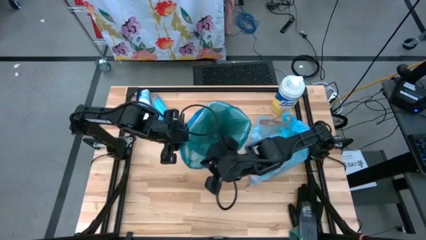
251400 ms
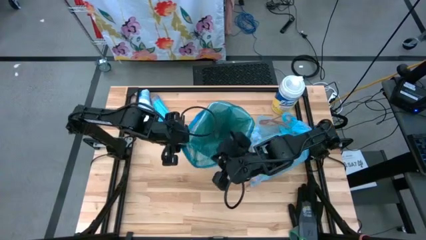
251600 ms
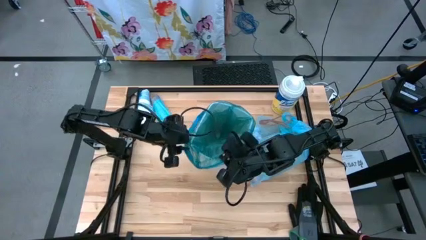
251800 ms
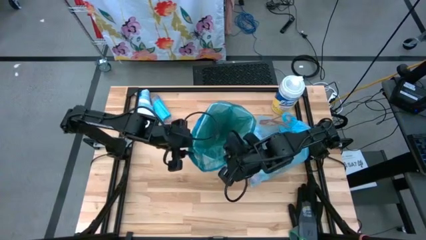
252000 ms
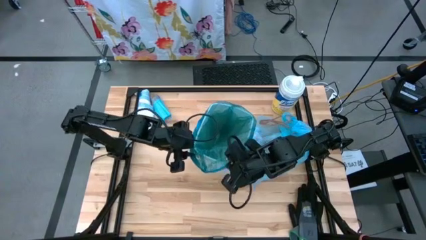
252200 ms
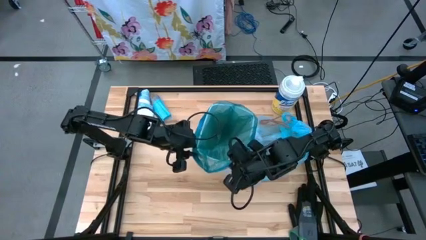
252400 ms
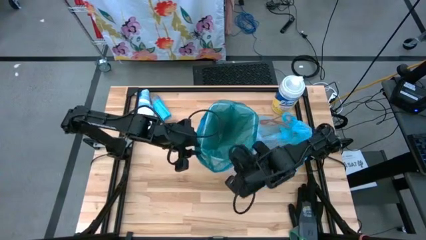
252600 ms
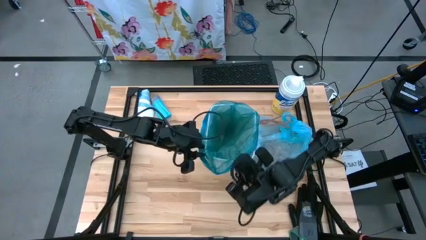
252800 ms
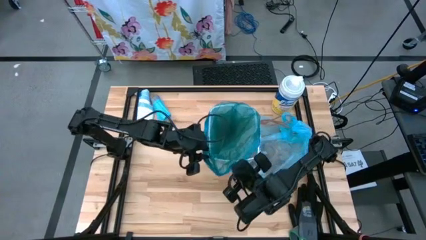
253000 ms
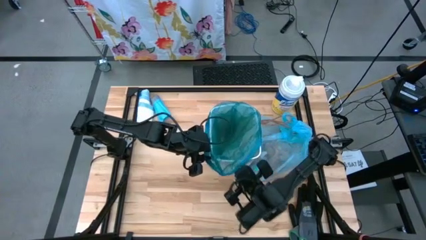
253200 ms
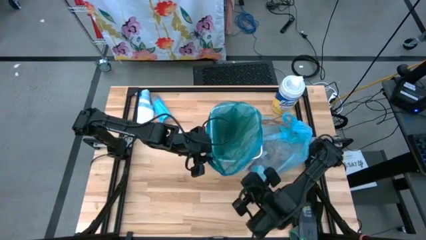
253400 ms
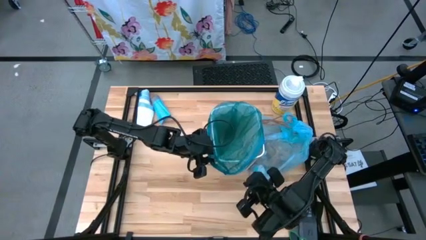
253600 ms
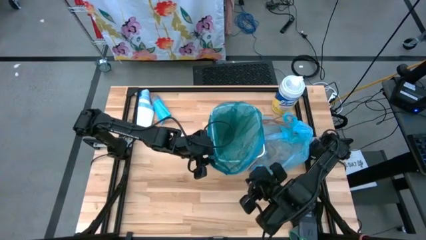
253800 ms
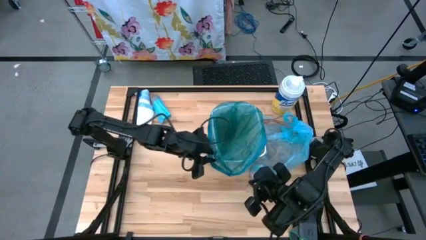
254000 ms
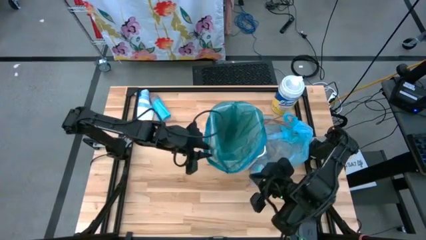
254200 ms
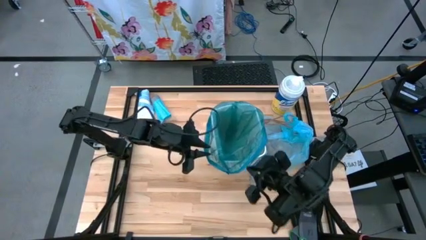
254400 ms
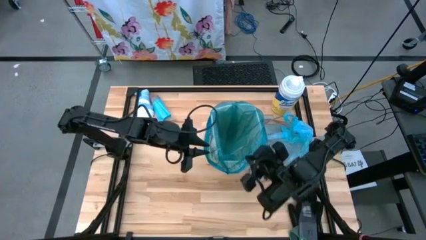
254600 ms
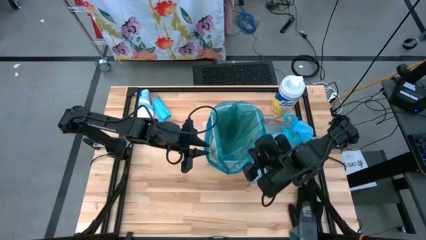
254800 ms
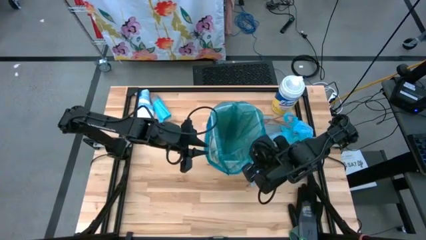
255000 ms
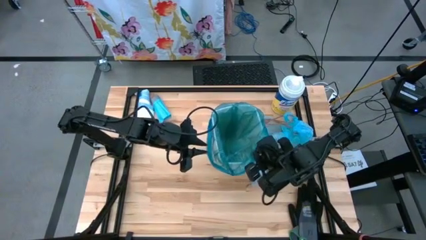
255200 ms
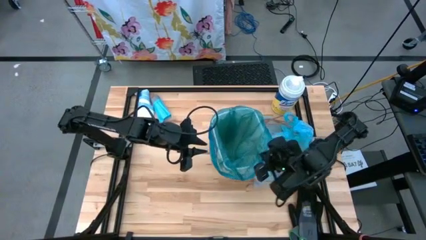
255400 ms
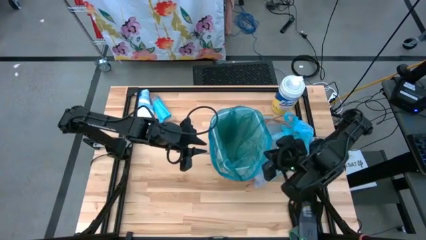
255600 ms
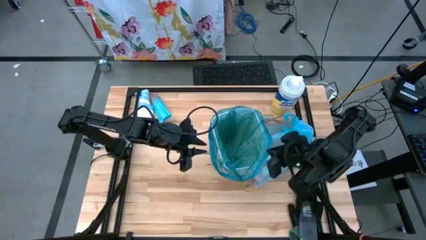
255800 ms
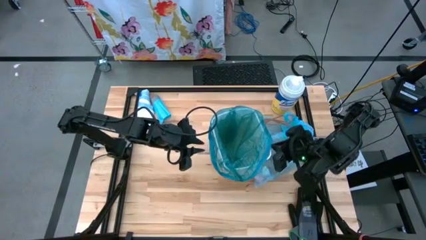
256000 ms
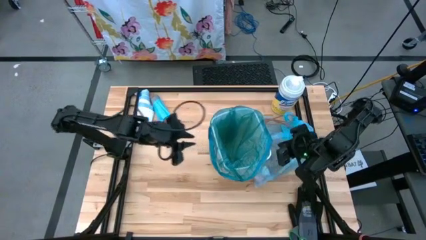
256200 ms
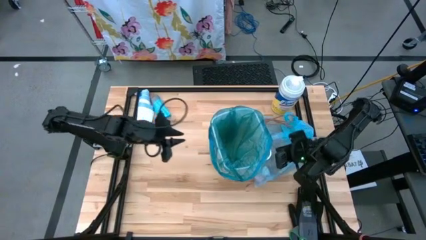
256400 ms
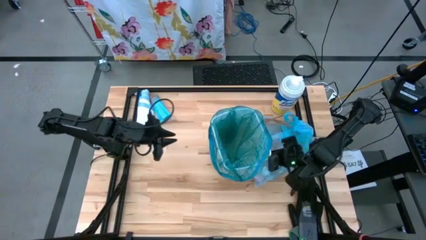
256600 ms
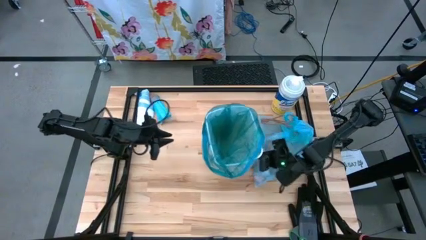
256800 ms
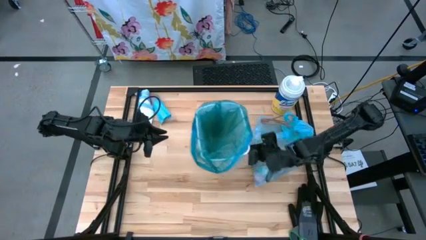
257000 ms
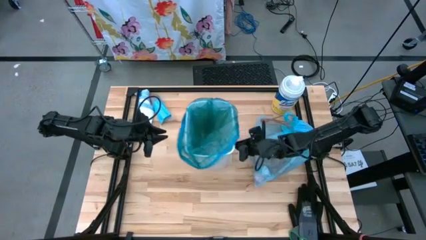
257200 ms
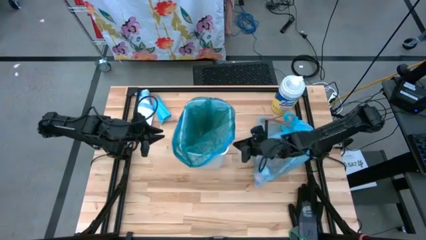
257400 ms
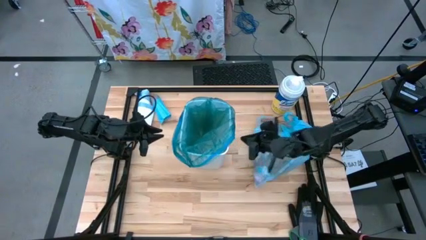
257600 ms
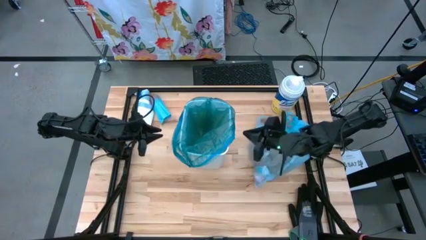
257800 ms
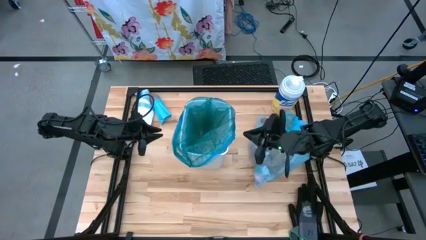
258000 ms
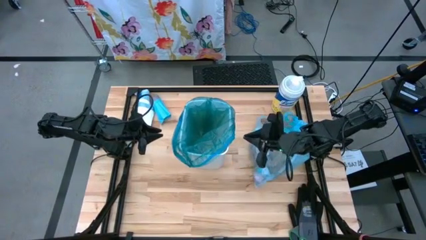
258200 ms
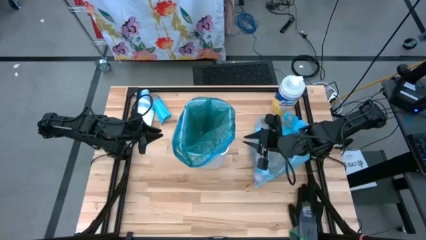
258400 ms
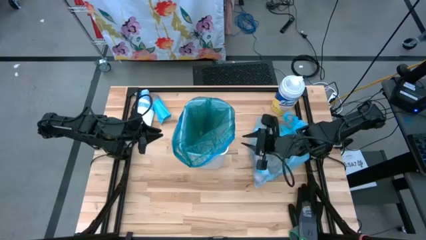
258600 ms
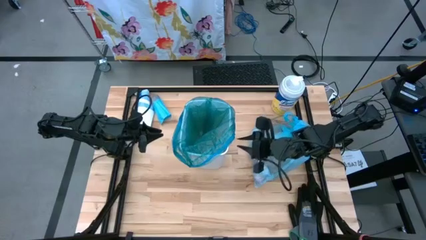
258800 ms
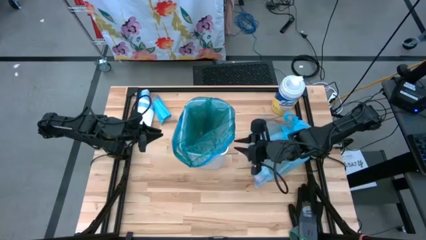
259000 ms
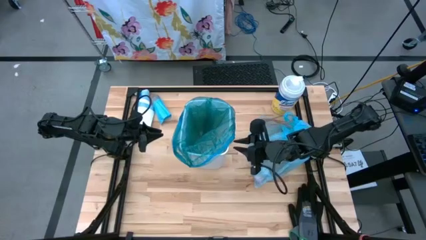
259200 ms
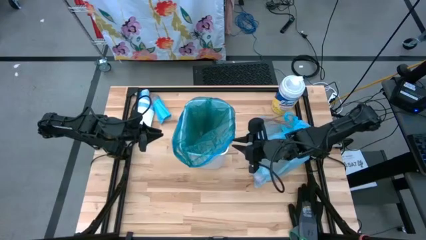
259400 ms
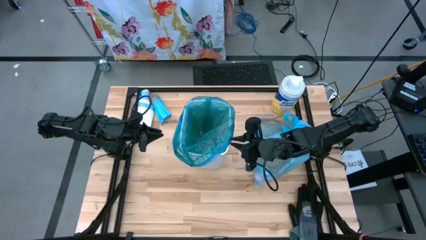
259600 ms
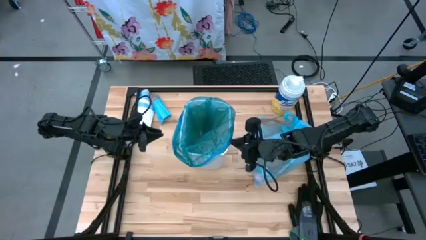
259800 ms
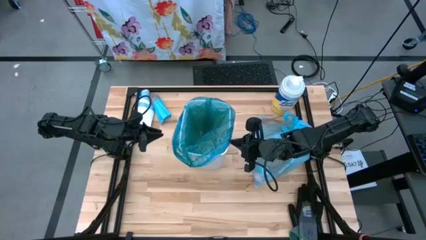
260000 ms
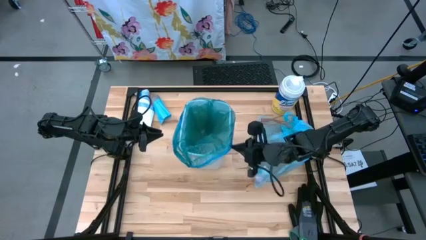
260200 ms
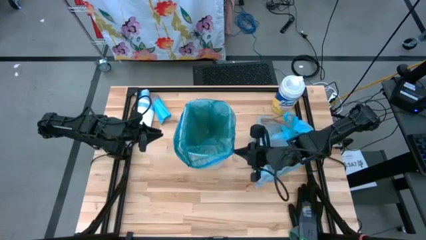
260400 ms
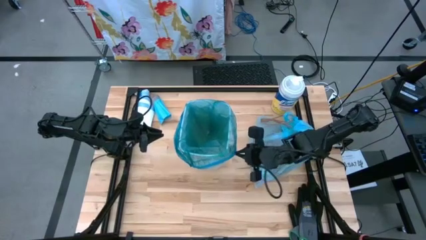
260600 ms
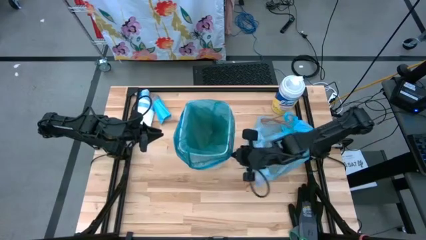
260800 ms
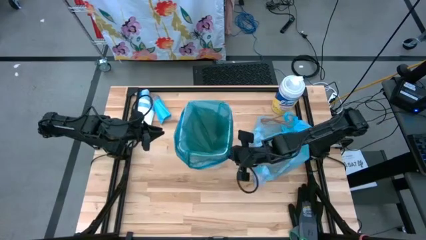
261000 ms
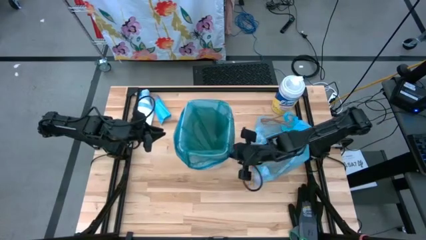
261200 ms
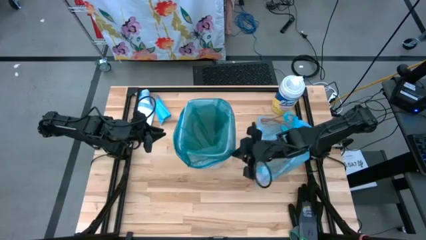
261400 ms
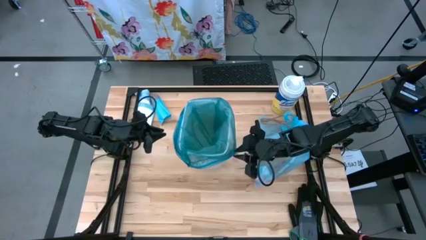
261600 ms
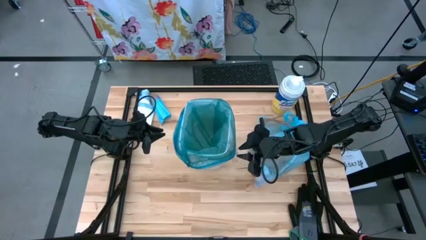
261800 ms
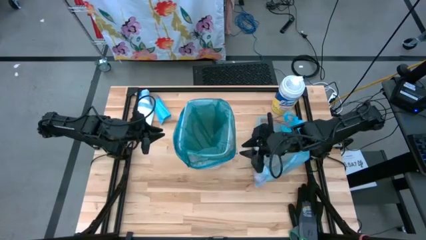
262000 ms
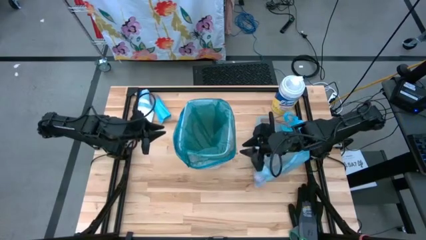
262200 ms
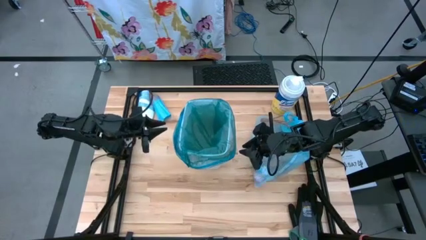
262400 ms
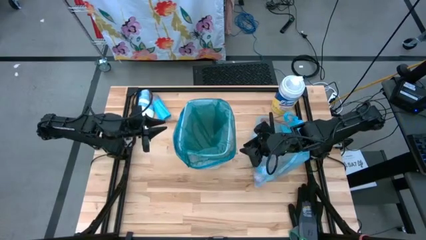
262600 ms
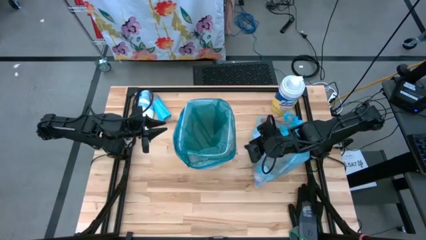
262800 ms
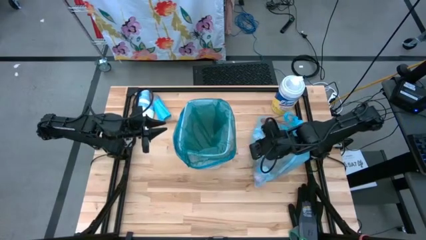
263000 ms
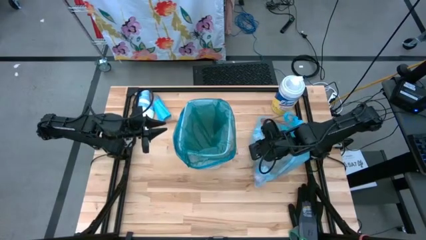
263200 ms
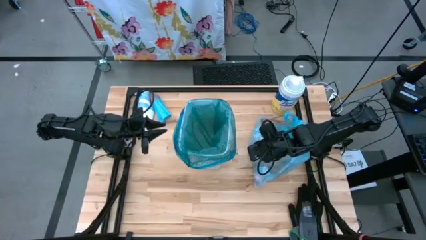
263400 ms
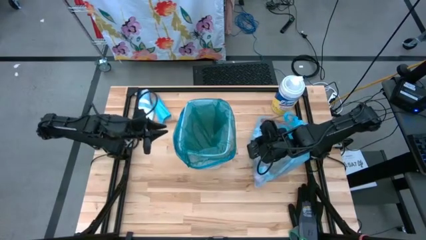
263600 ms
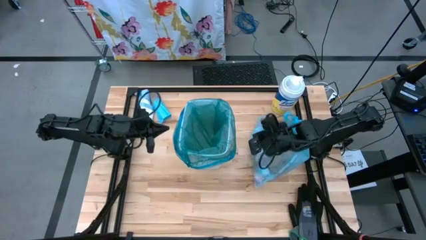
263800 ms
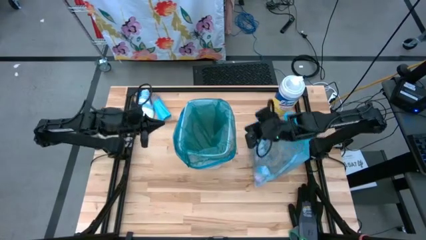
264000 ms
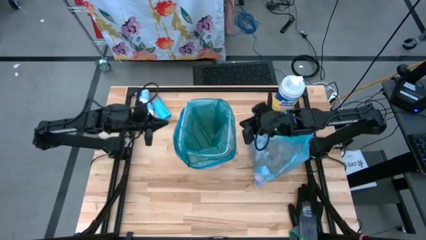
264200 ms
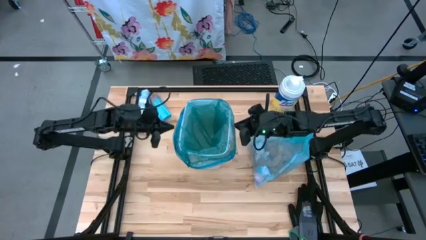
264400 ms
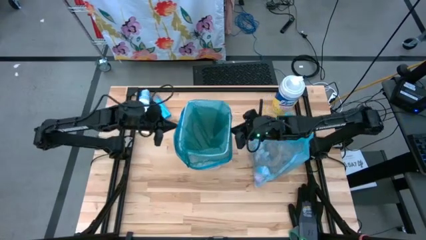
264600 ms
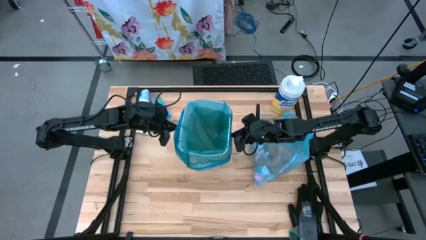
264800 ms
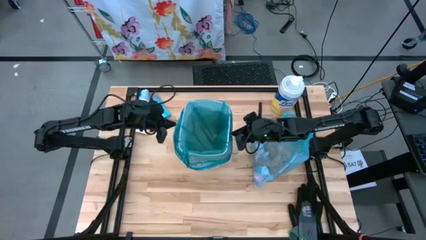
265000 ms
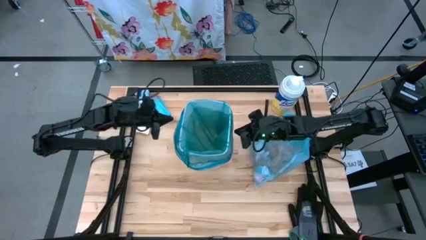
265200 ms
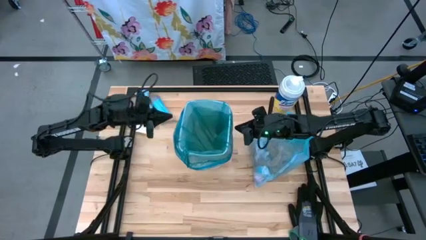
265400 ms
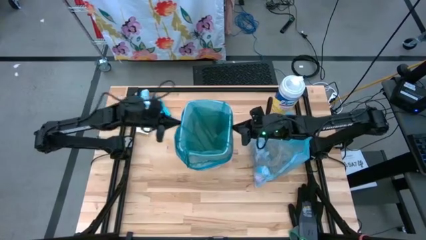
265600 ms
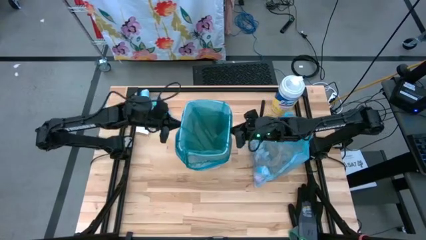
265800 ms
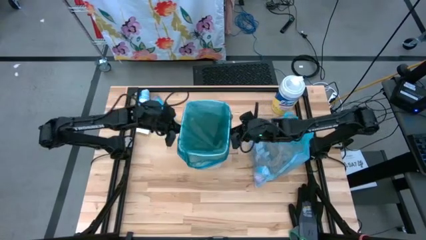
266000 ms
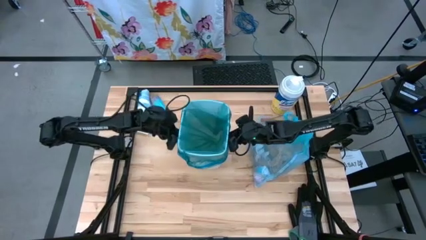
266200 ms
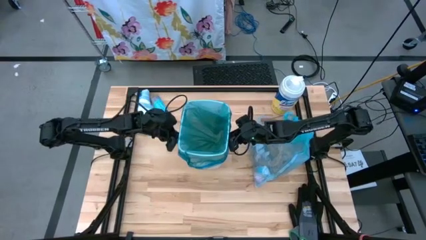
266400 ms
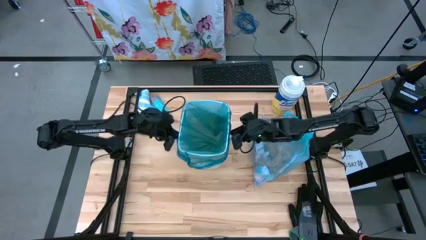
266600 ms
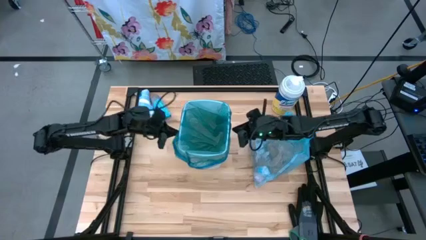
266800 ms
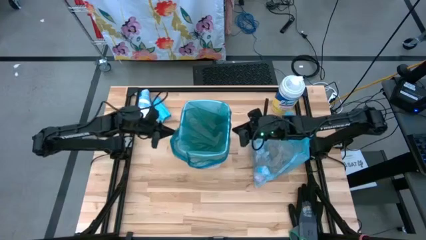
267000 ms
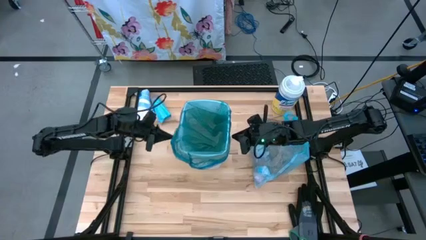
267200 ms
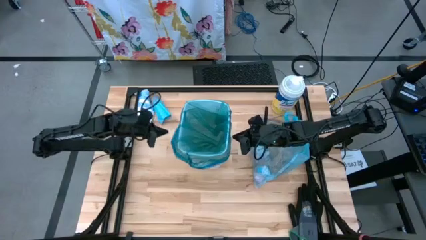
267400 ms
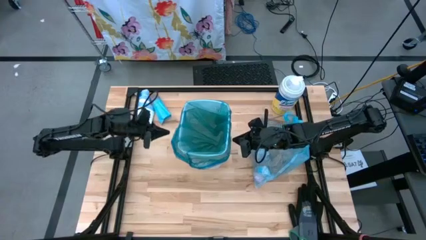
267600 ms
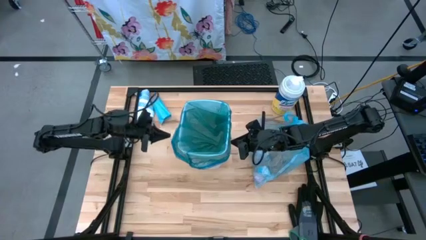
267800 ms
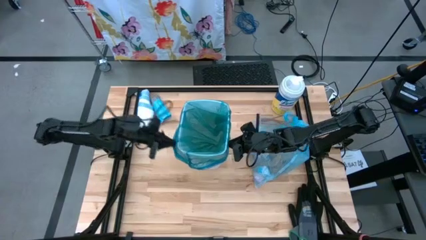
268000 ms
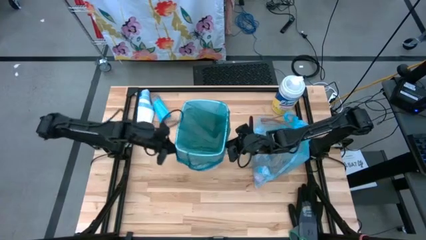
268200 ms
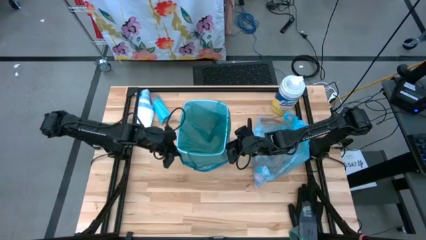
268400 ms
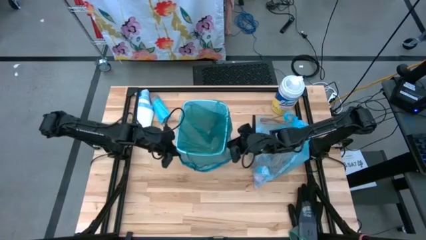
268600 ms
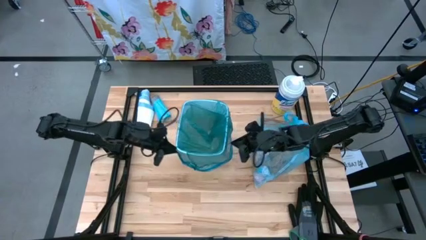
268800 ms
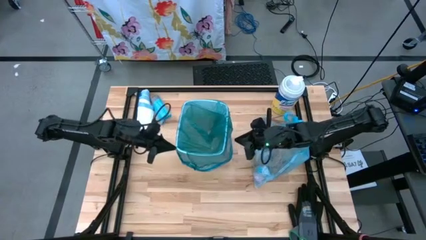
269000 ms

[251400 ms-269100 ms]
Task: place trash/remove bag and relplace
Insert the blue trash bag into the white trash bin
